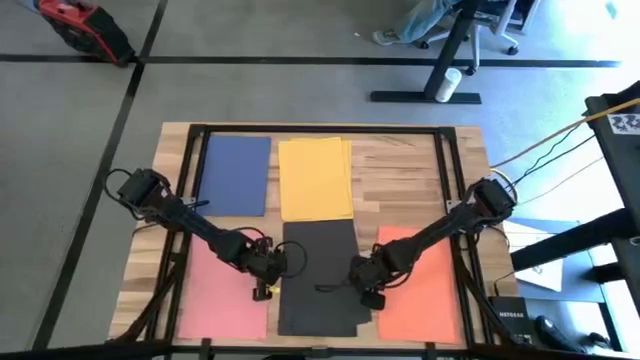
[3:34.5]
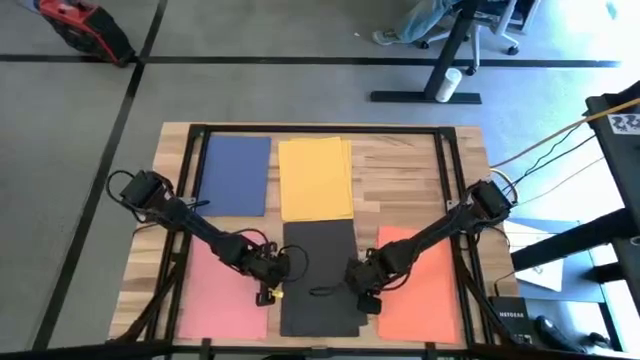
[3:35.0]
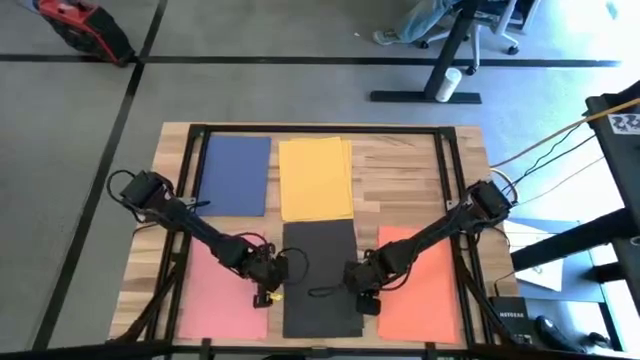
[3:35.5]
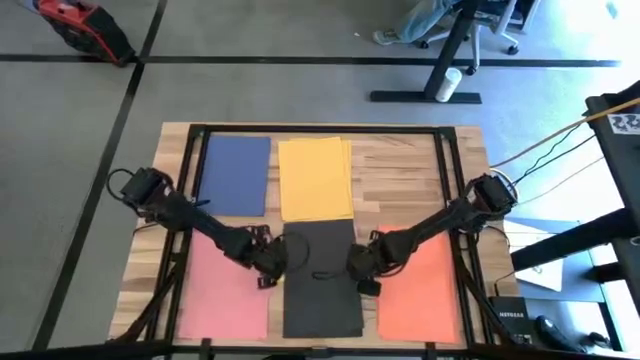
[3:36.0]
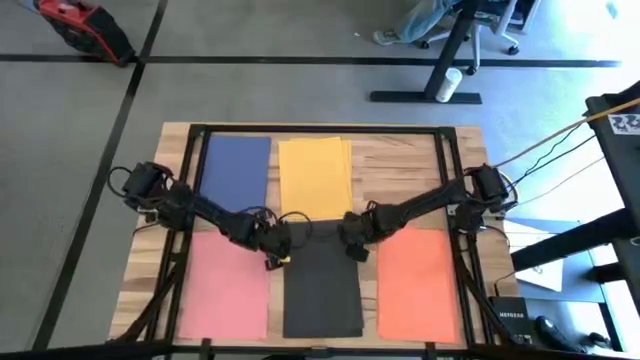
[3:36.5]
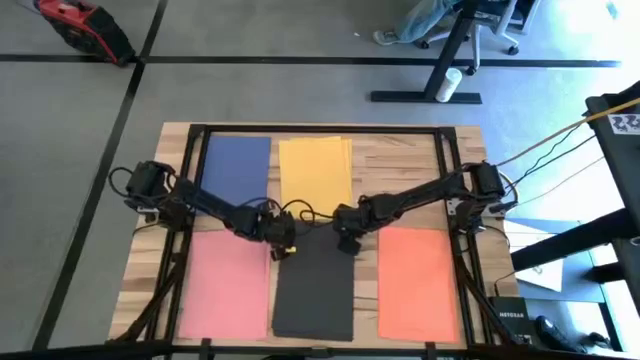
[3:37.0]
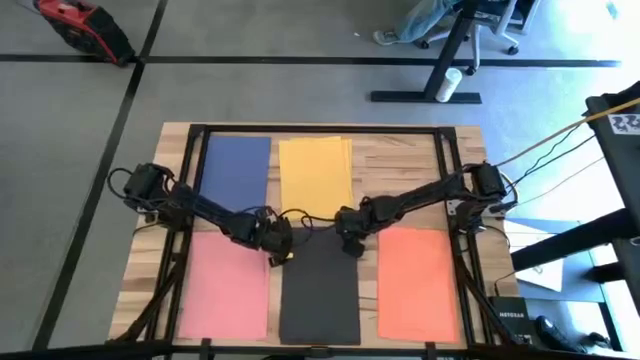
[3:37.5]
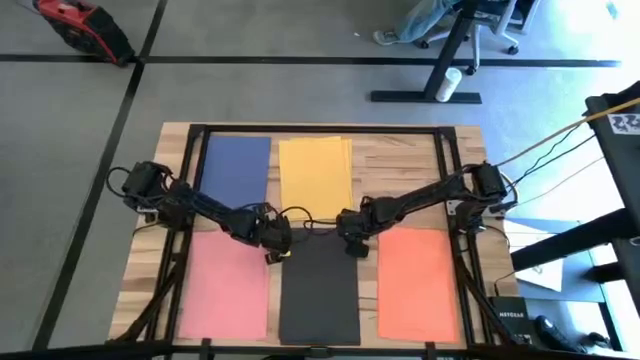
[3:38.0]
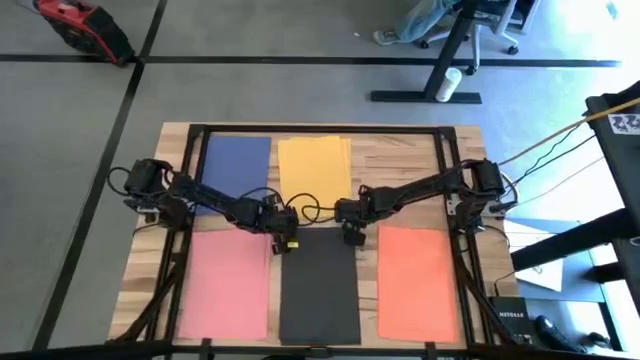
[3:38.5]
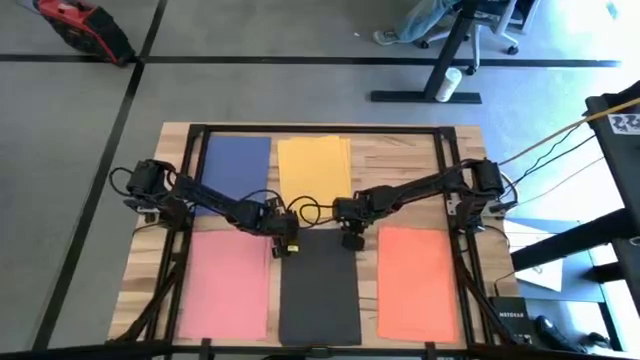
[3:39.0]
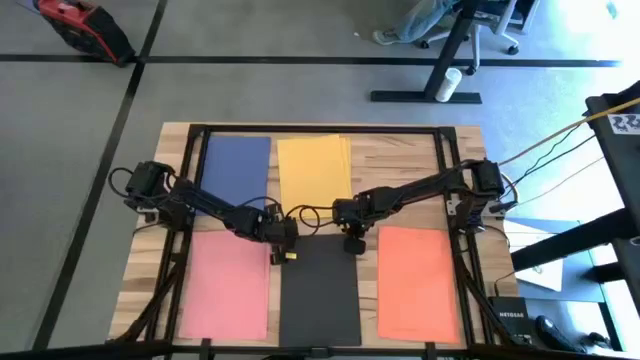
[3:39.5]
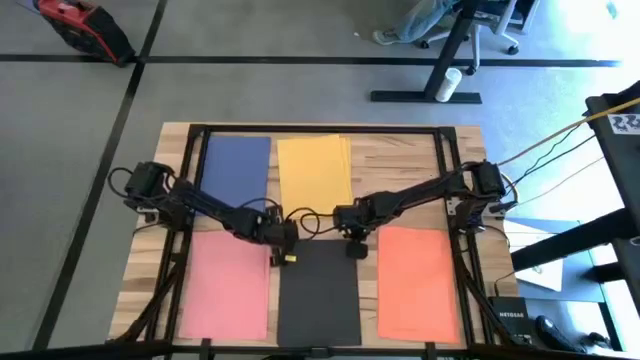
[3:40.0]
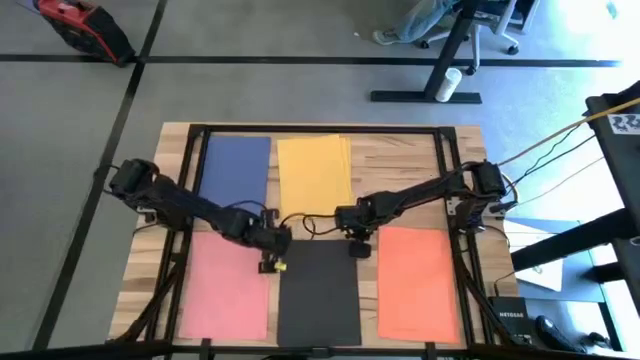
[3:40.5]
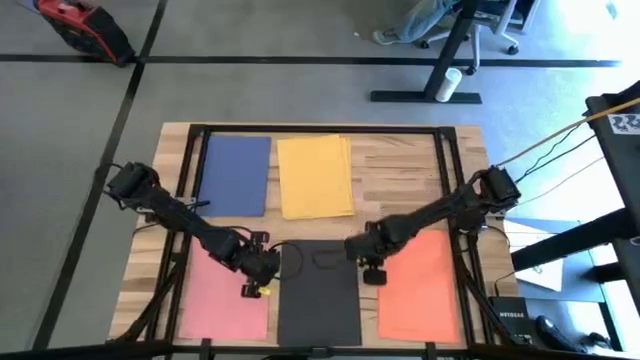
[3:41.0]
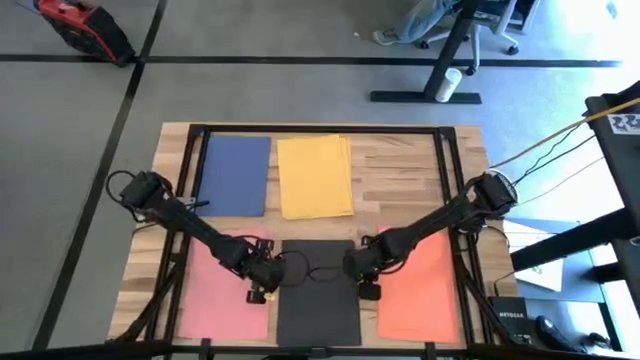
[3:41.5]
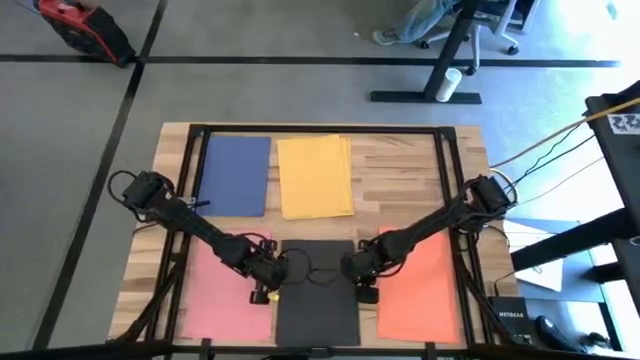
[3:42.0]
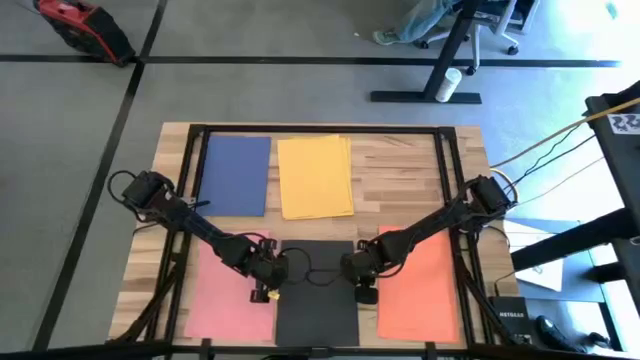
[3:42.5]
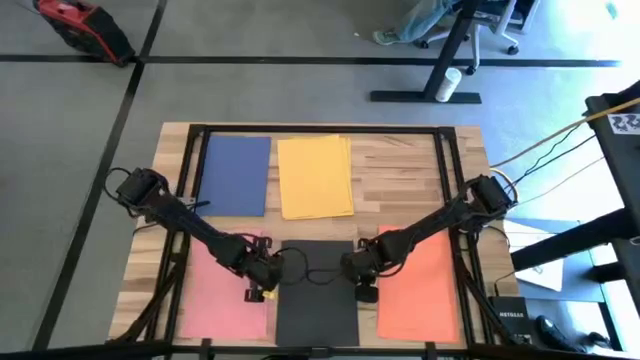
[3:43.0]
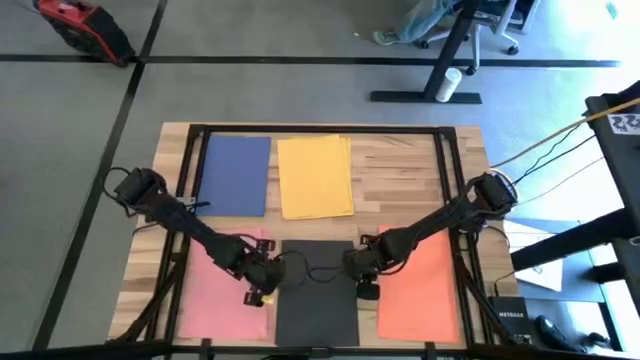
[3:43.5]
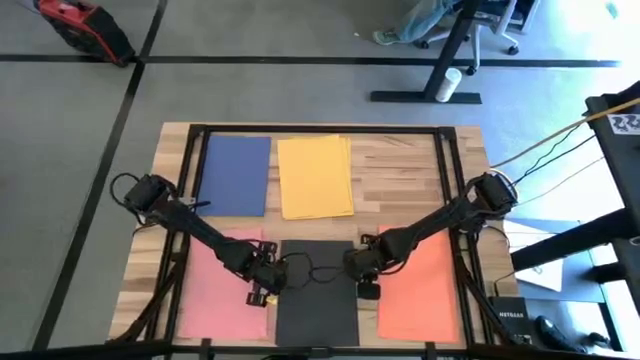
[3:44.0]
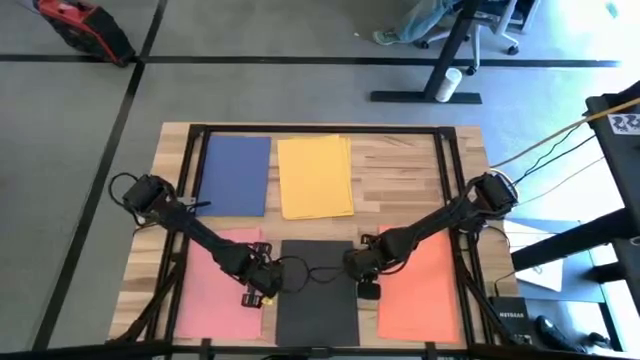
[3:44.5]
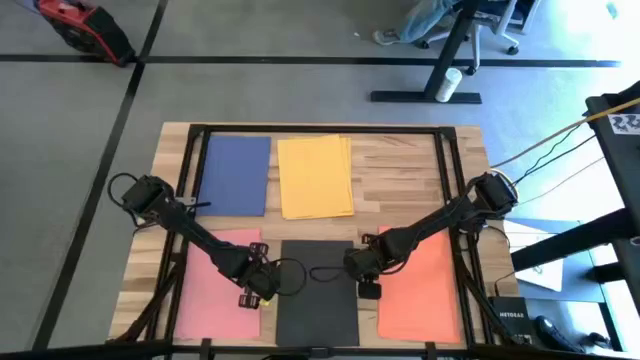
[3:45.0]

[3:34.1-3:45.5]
Task: Organize paper
Adjust the stacked colored papers on the table

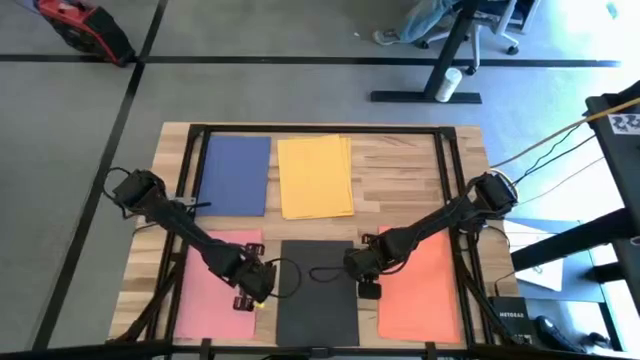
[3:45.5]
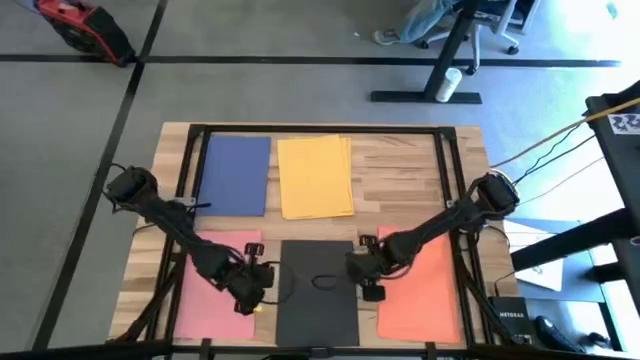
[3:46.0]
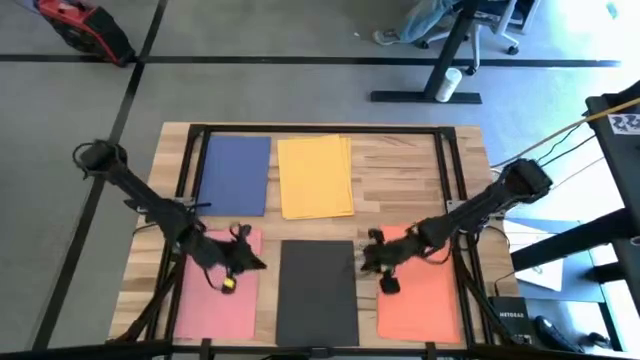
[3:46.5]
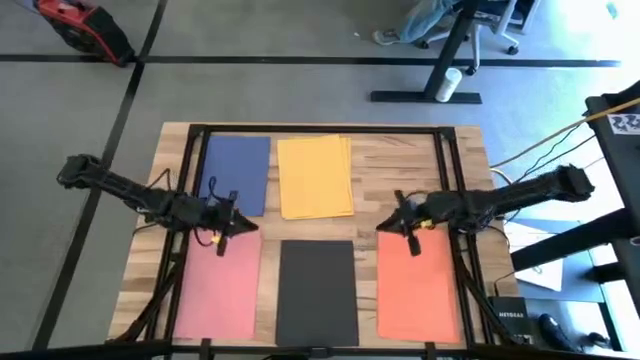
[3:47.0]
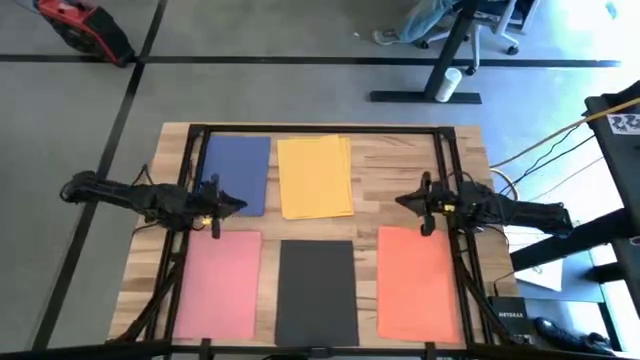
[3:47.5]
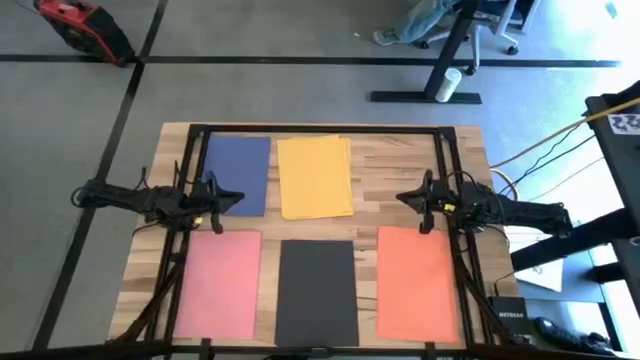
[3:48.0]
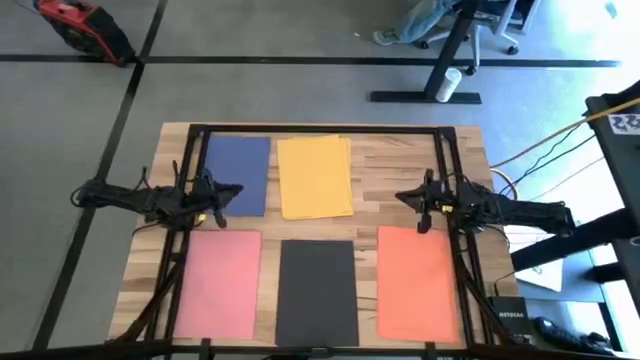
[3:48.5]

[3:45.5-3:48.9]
Return to Home Position

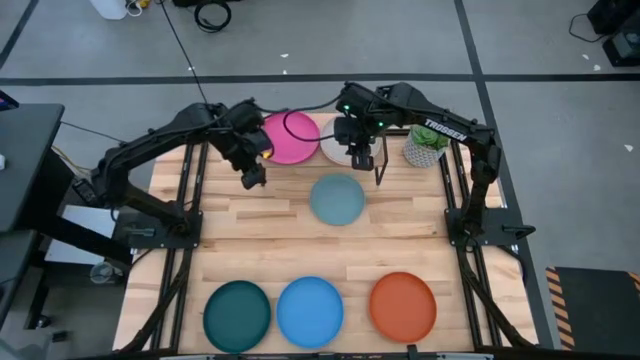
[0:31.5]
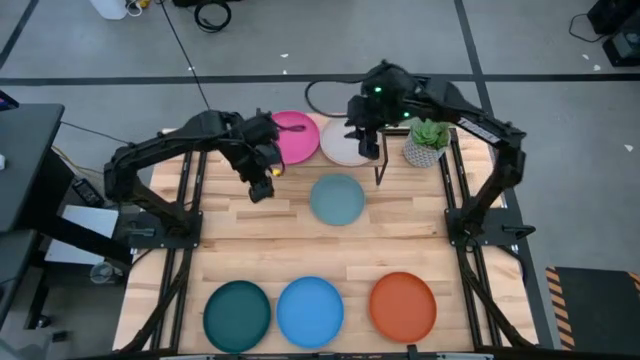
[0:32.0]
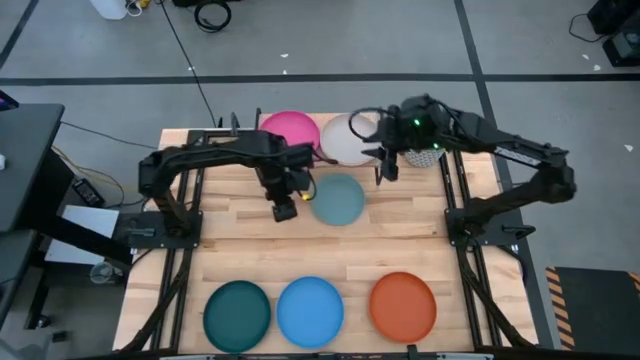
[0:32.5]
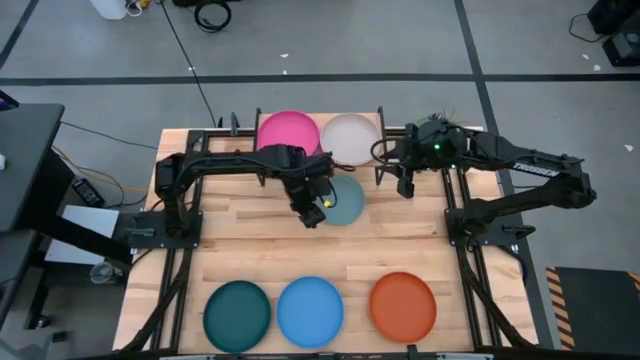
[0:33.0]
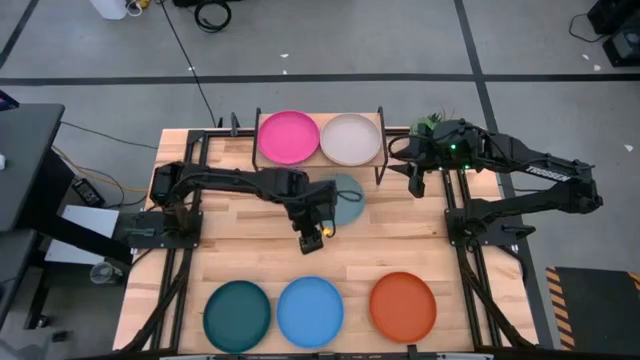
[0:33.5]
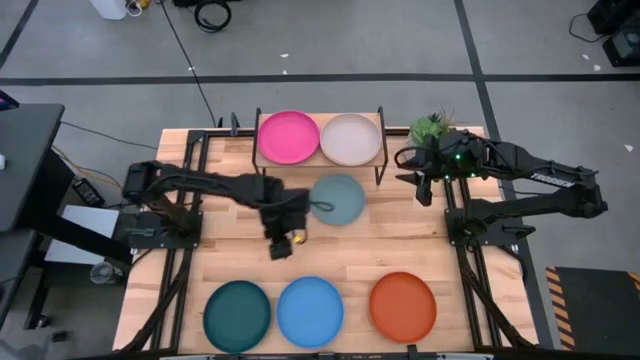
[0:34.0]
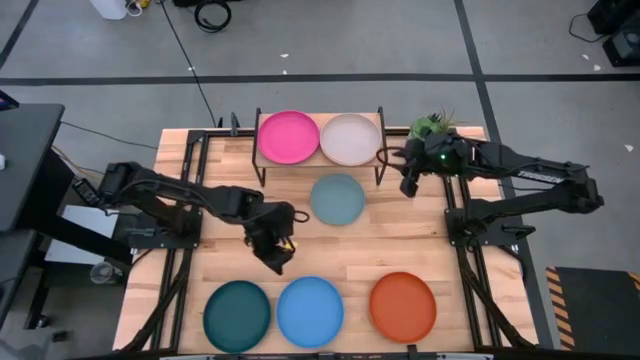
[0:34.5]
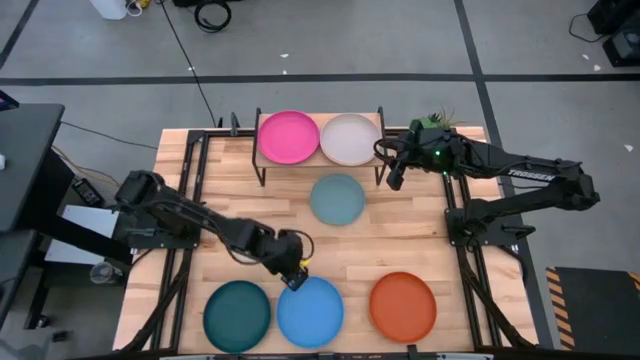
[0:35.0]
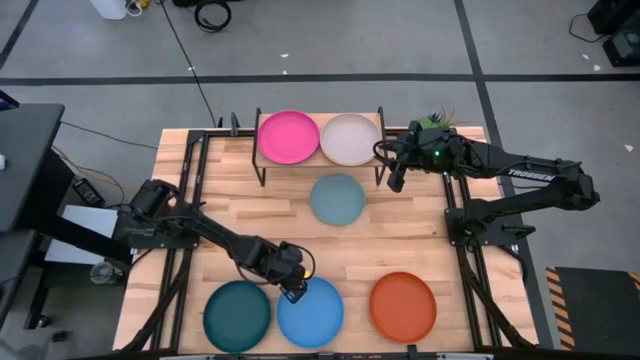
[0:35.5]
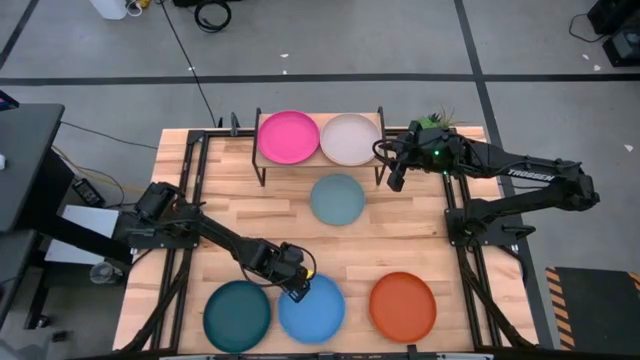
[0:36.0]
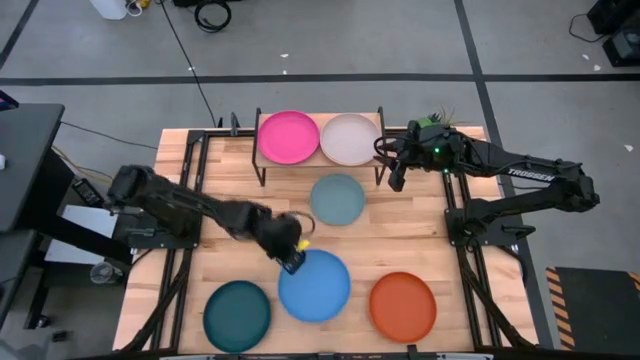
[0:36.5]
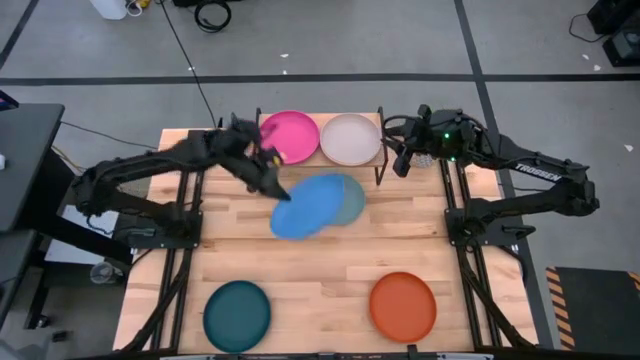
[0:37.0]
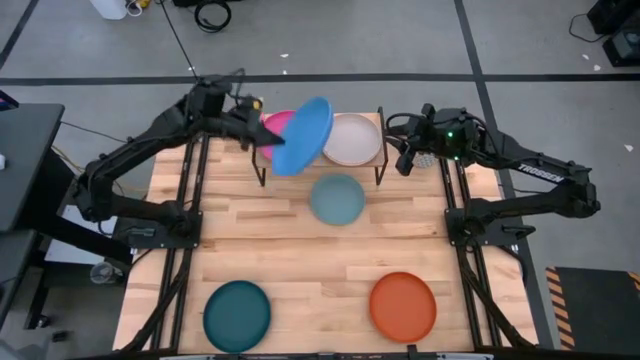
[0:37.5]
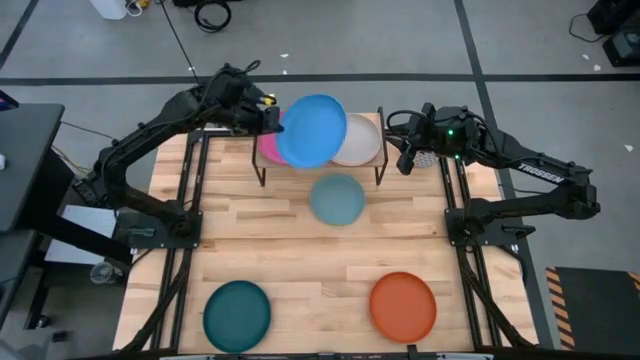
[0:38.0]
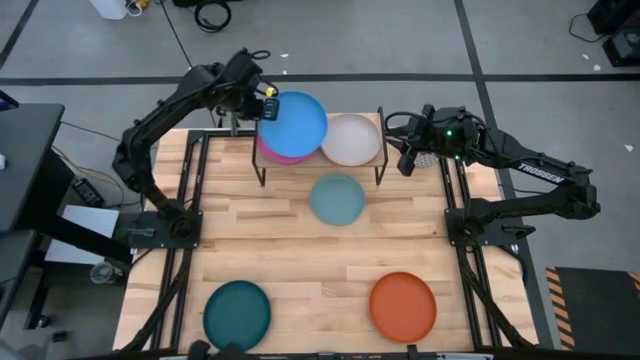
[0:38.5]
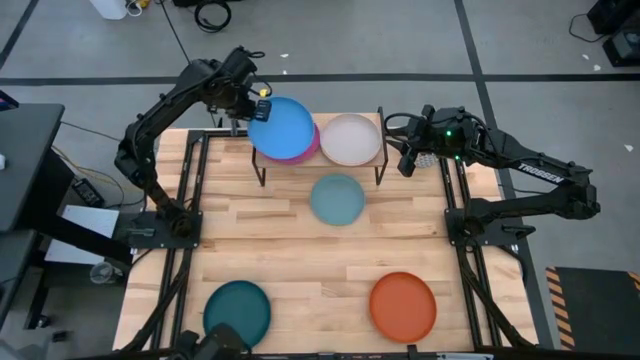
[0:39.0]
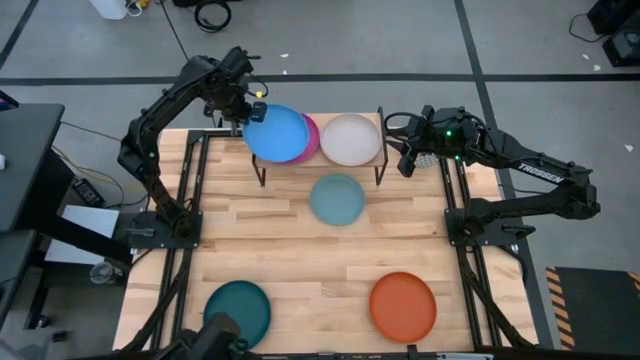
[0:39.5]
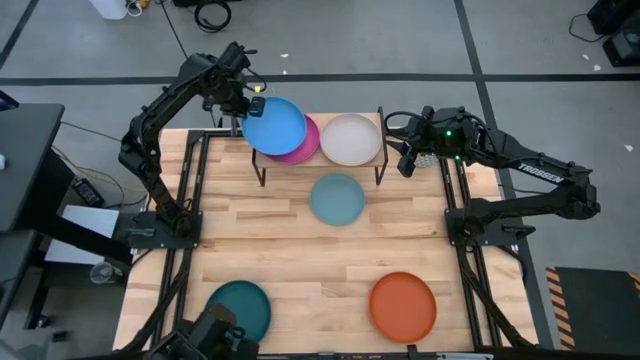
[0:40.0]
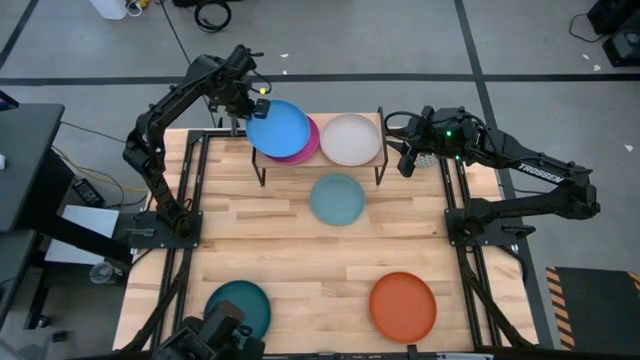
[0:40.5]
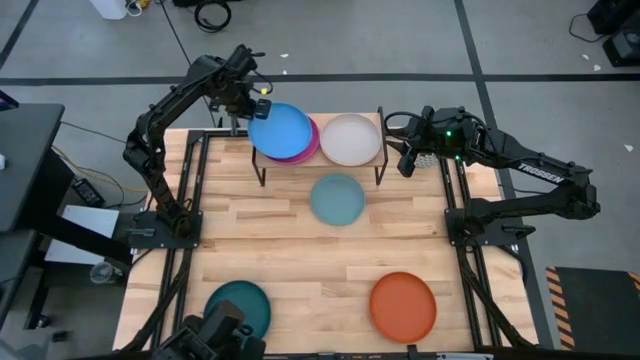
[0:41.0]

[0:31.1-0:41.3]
Task: Place and stack plates onto a shelf
Stack the blue plate on top of the pink plate on the shelf
